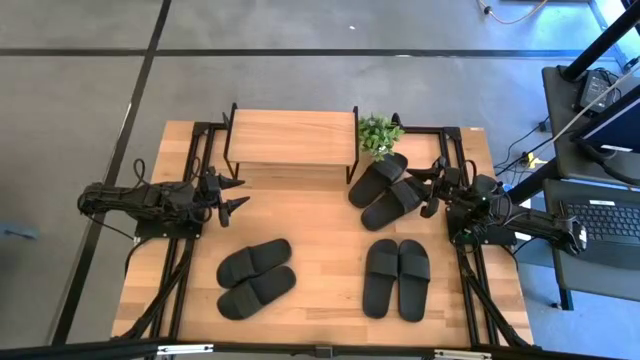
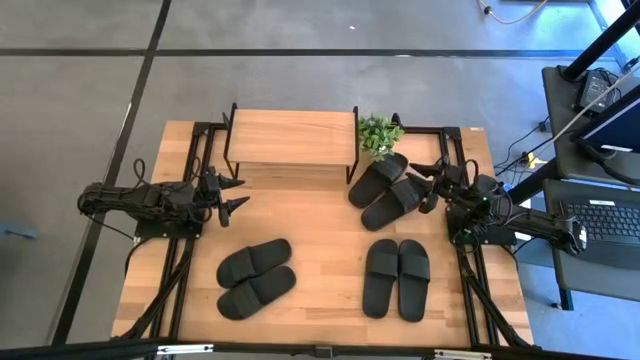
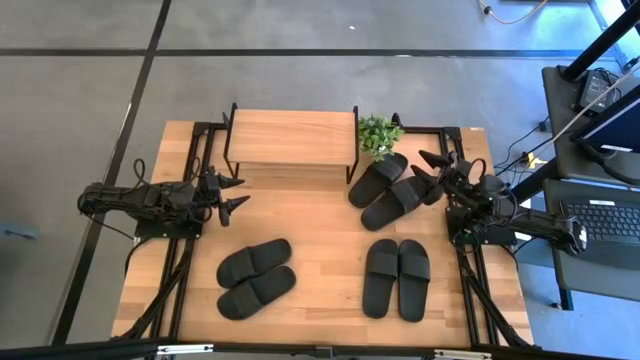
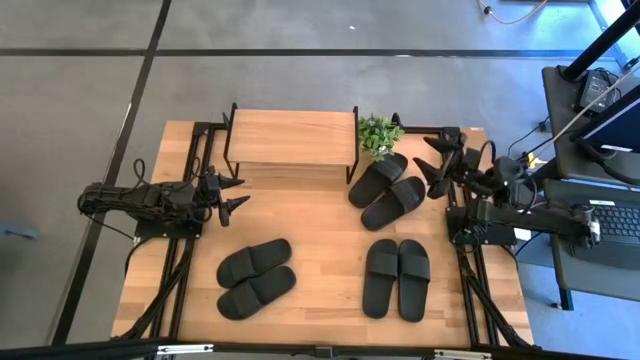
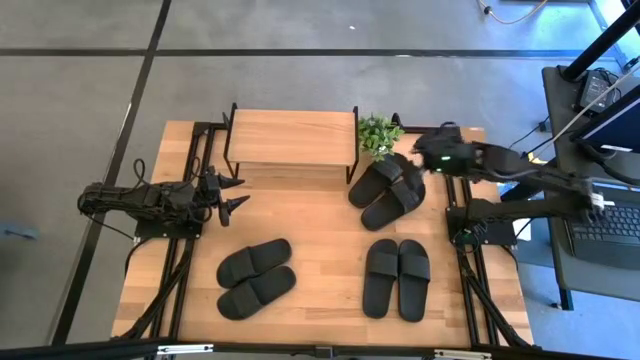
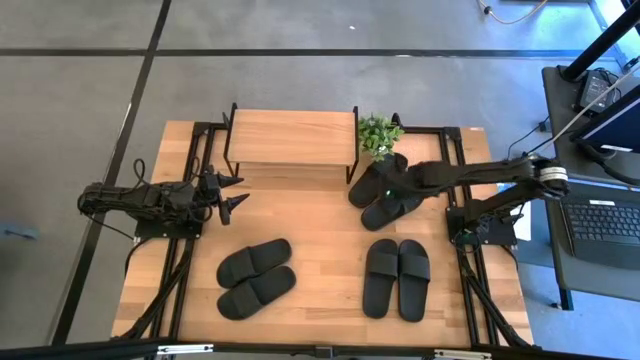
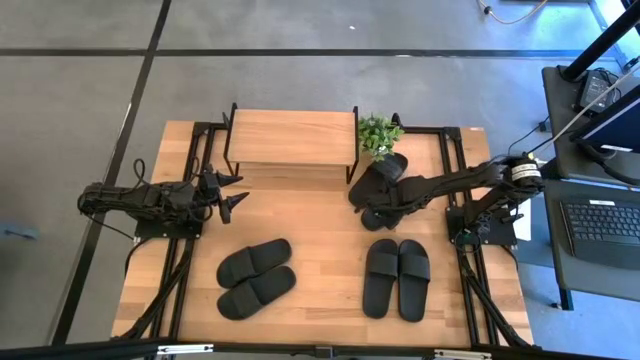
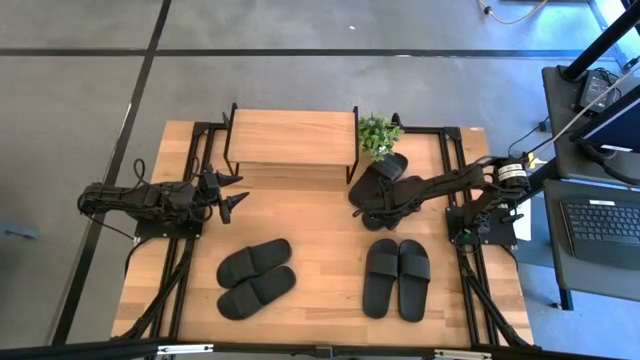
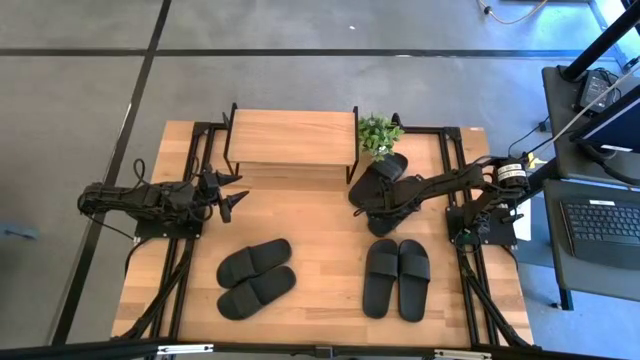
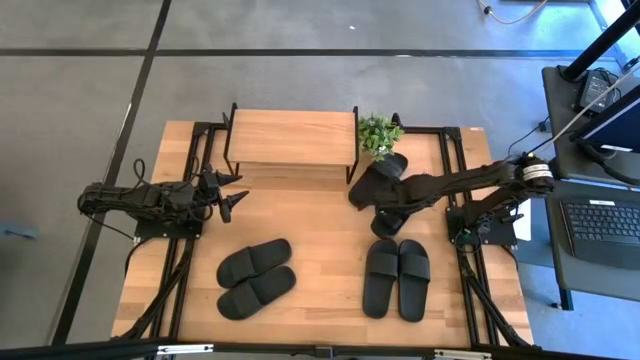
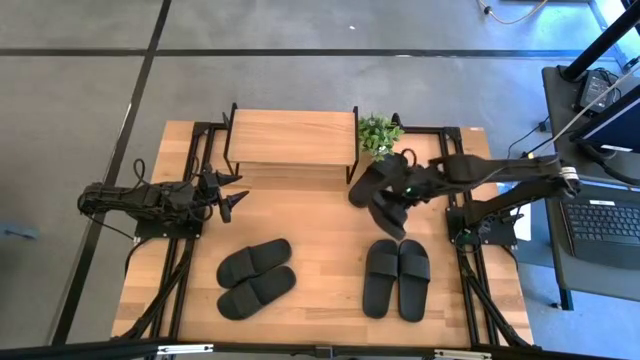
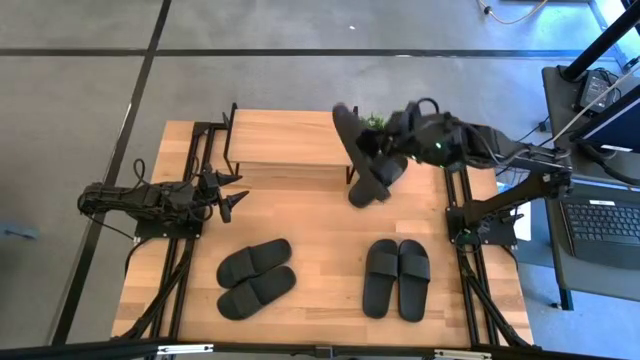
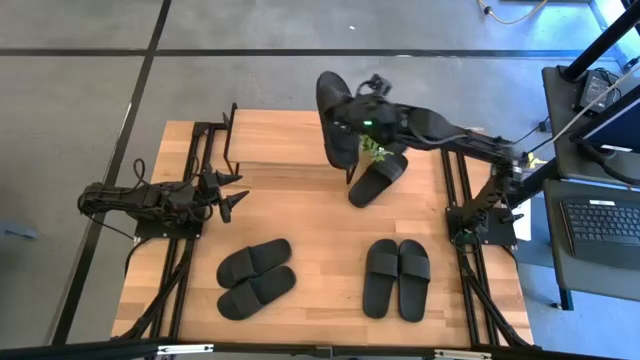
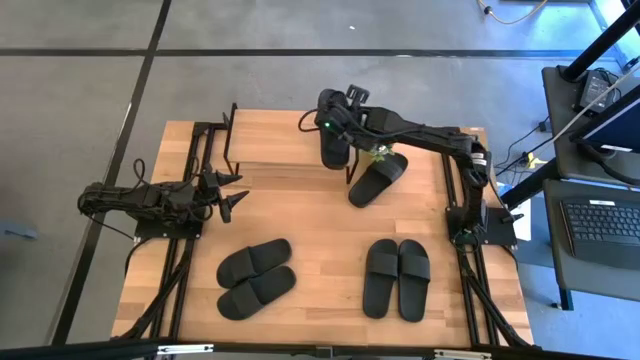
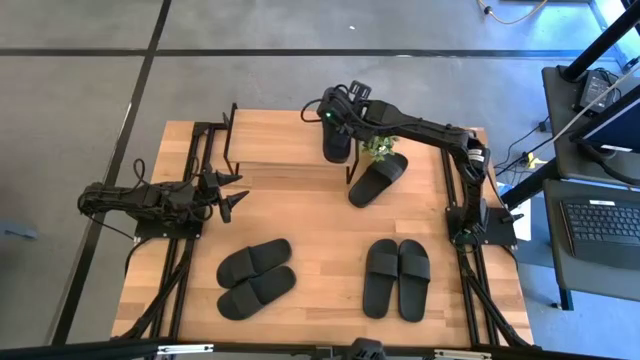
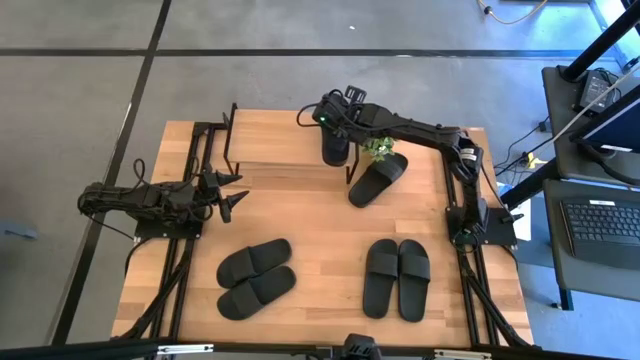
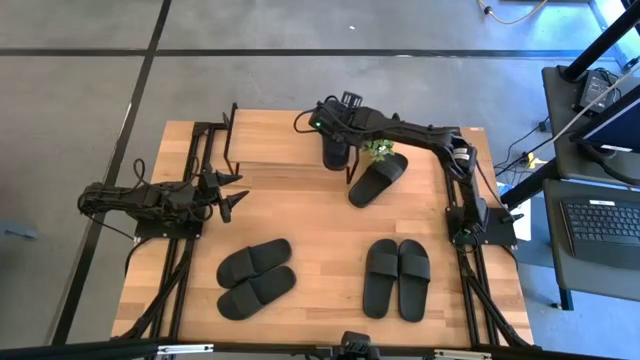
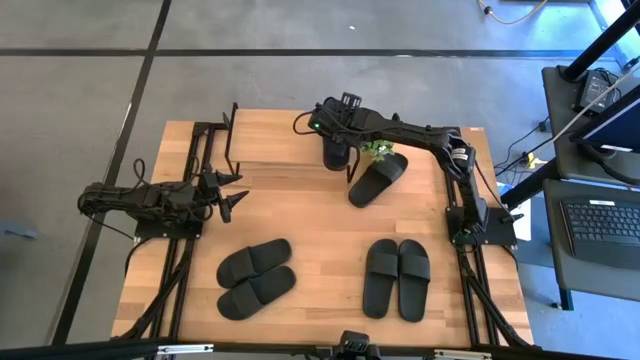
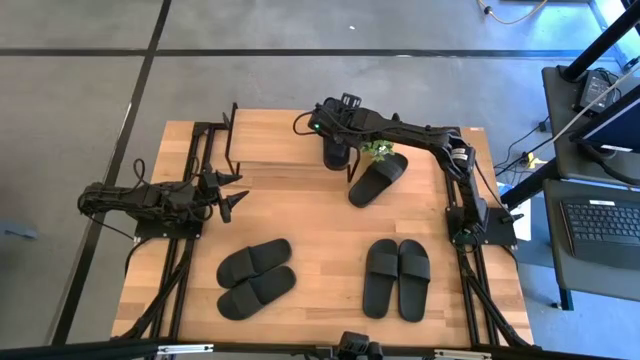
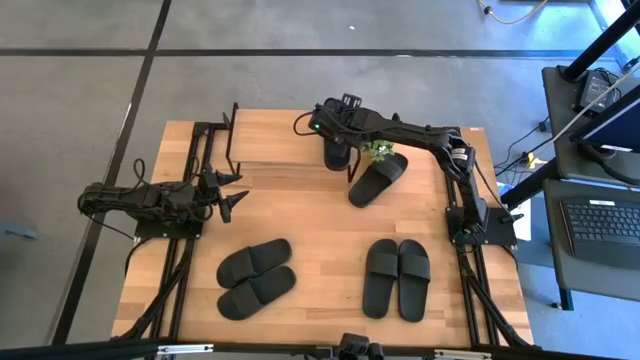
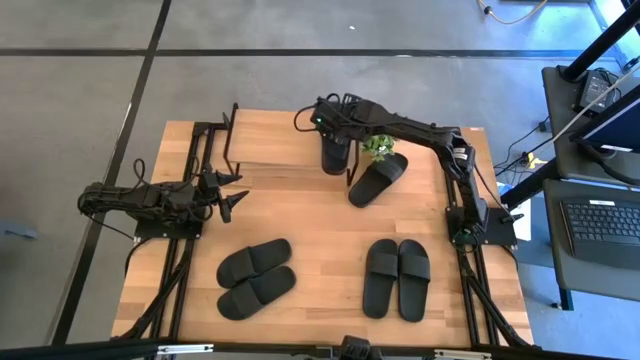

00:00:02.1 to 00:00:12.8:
Task: Pick and place slides into the shelf
Put the black slide on the shelf

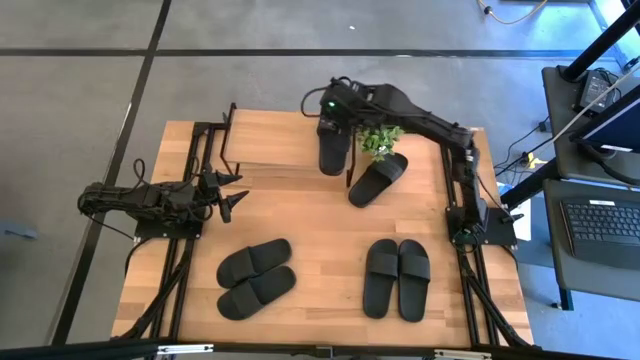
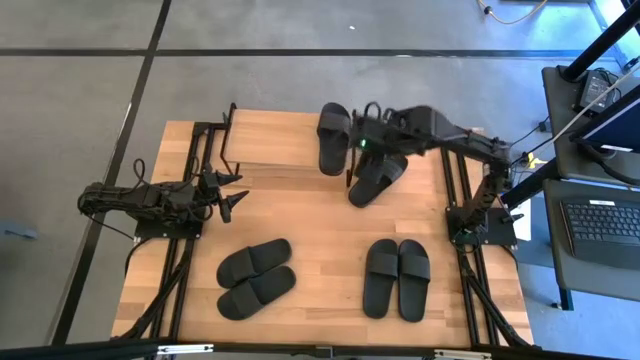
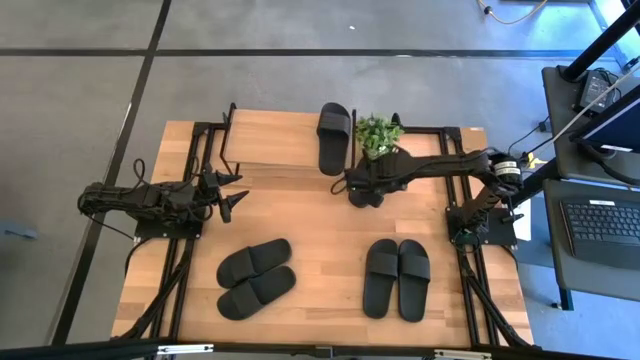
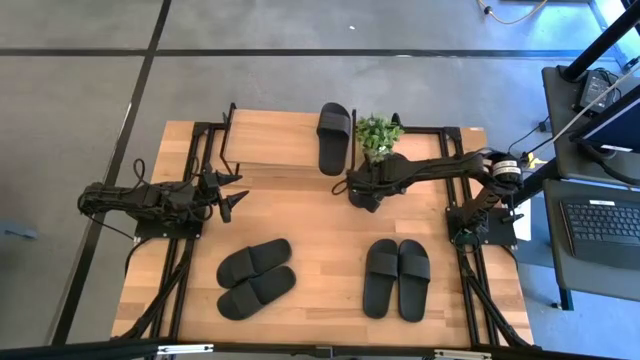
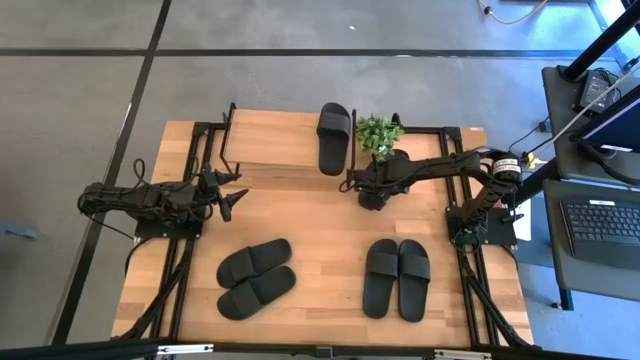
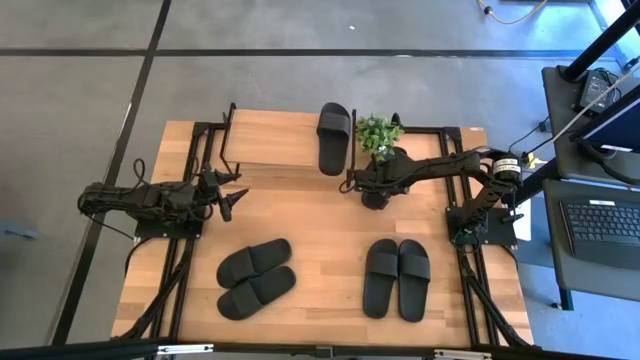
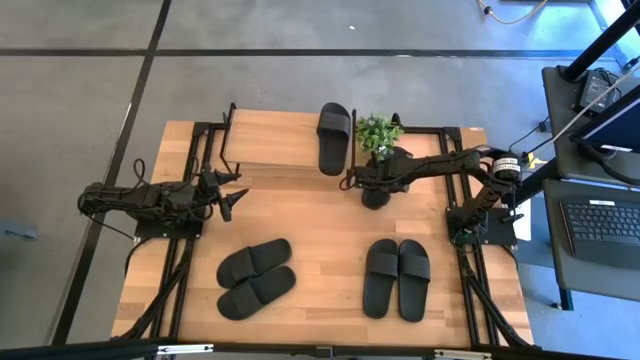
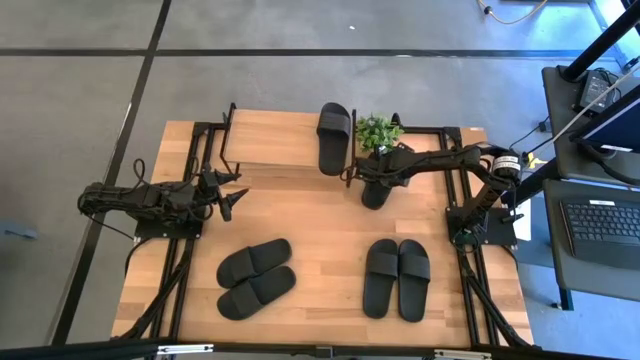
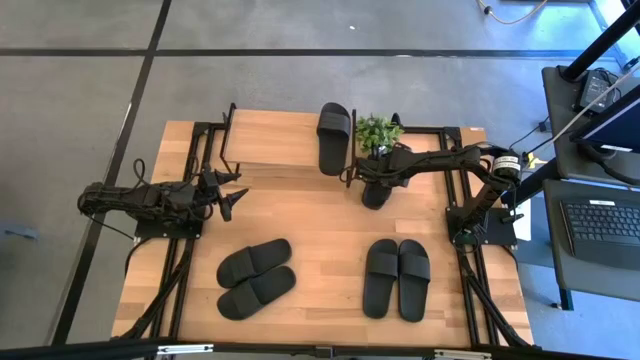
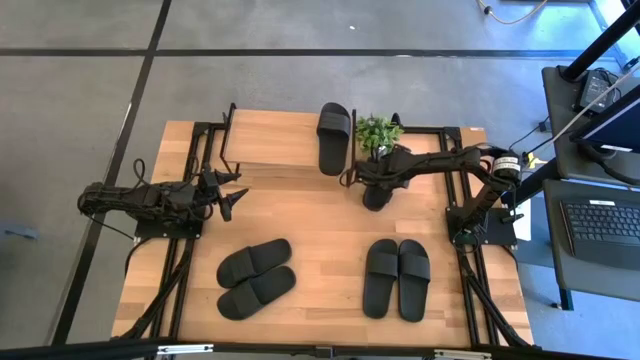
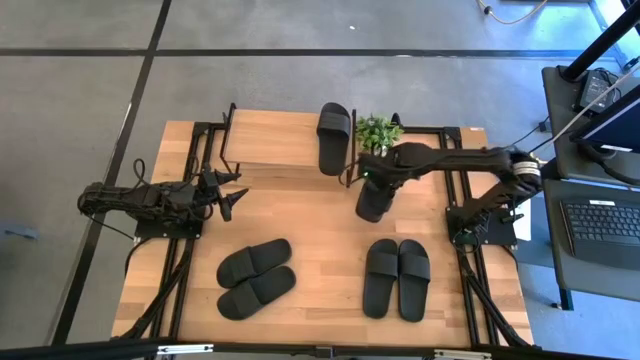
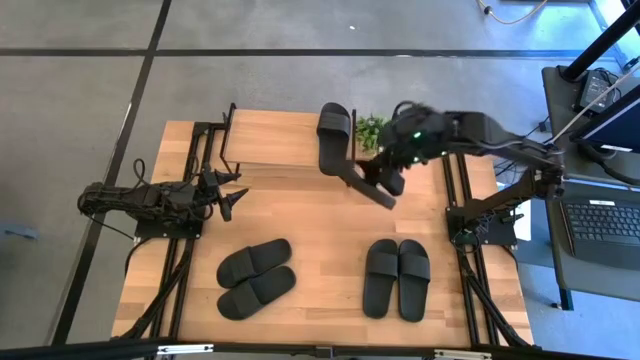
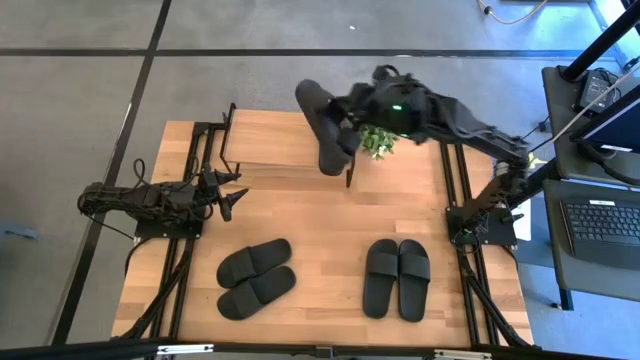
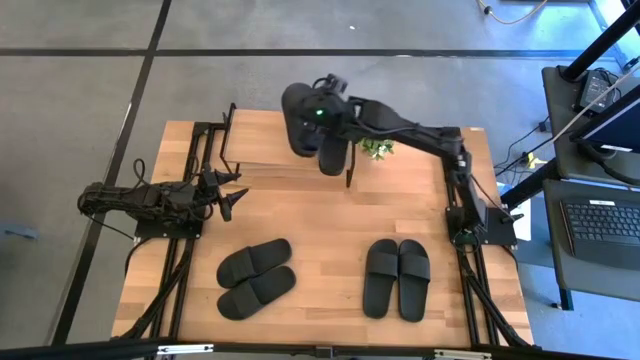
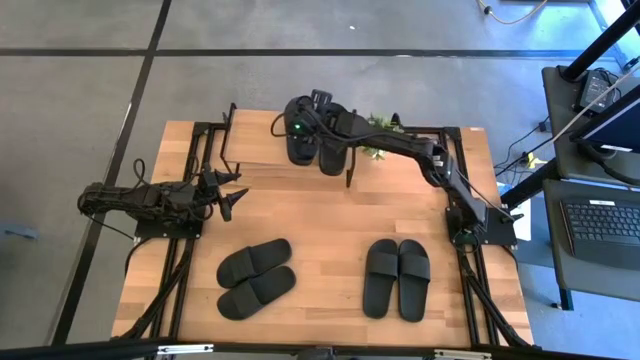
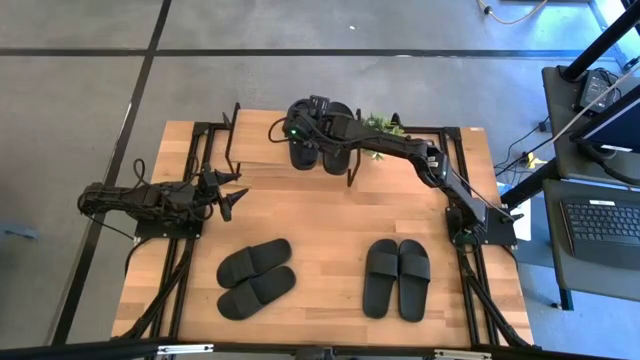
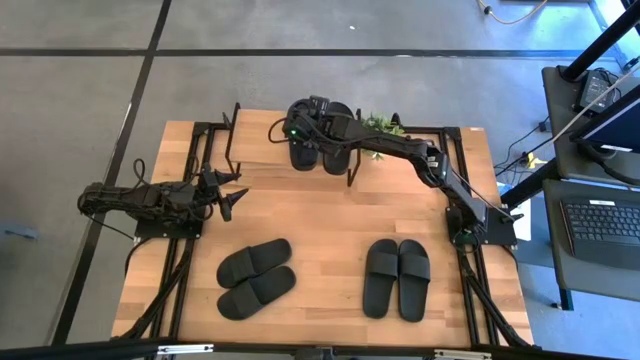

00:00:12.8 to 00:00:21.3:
Put the black slide on the shelf
